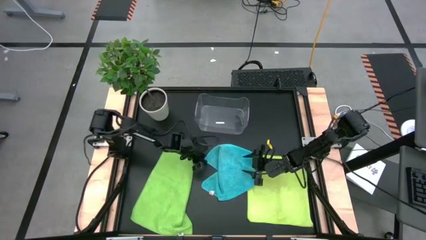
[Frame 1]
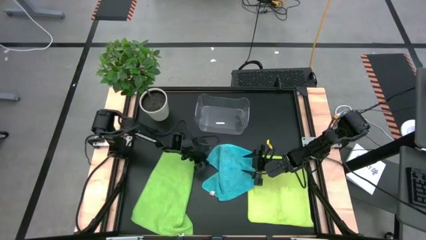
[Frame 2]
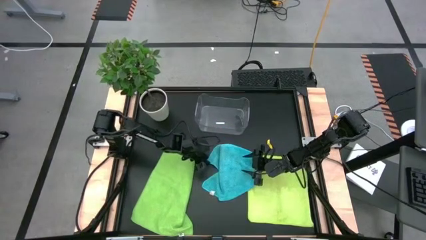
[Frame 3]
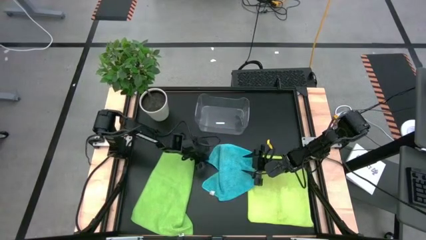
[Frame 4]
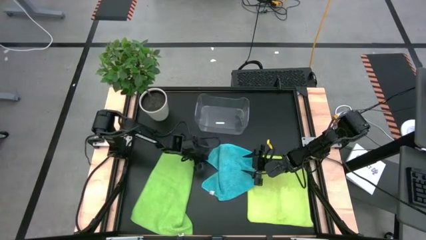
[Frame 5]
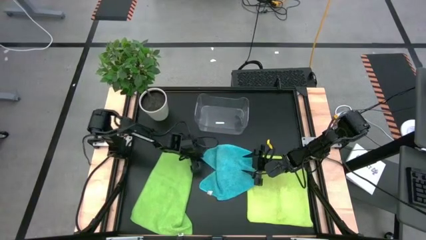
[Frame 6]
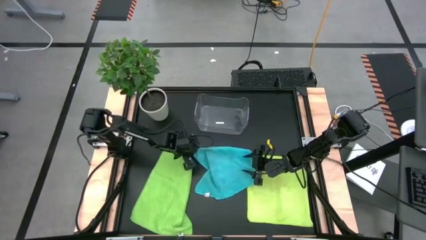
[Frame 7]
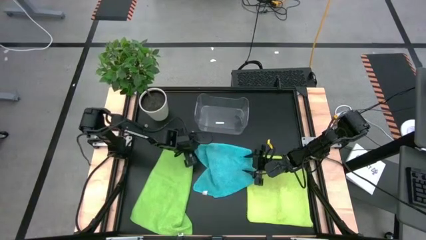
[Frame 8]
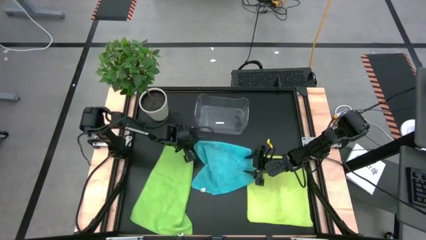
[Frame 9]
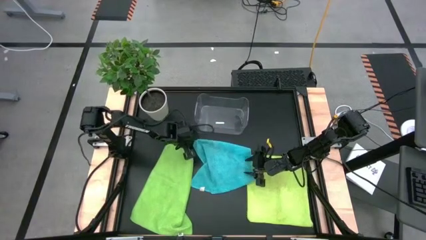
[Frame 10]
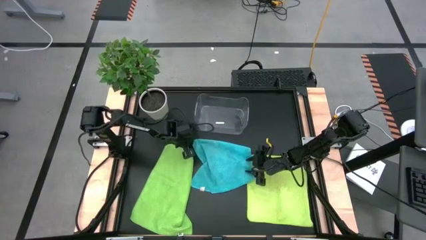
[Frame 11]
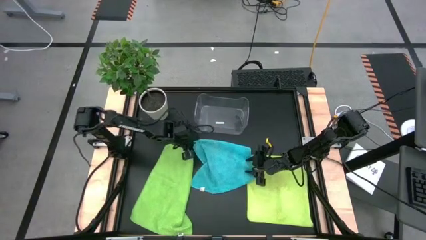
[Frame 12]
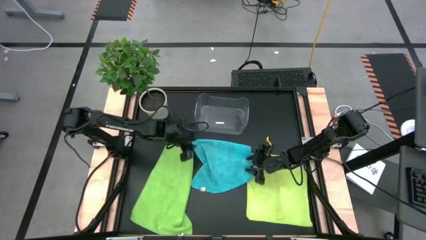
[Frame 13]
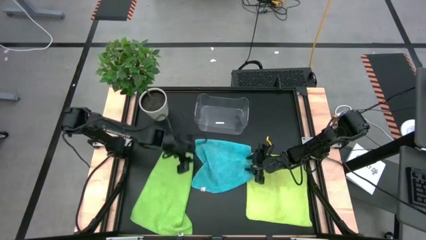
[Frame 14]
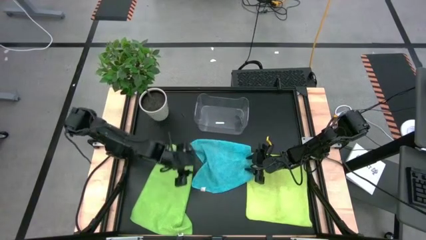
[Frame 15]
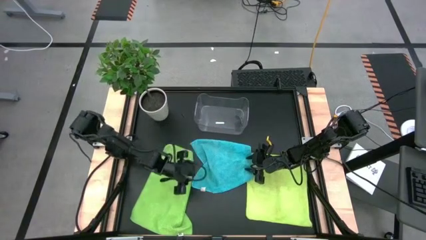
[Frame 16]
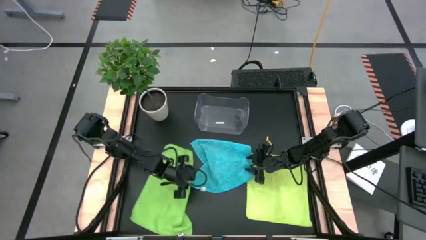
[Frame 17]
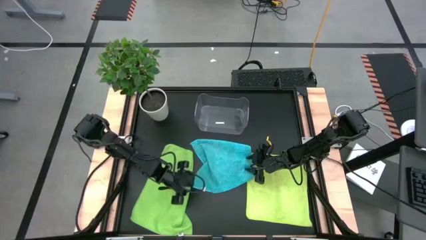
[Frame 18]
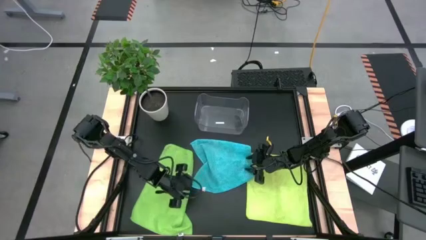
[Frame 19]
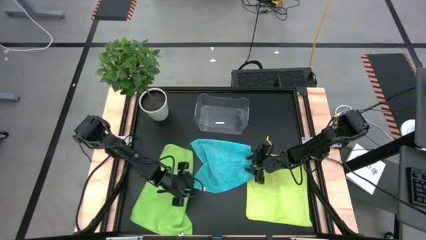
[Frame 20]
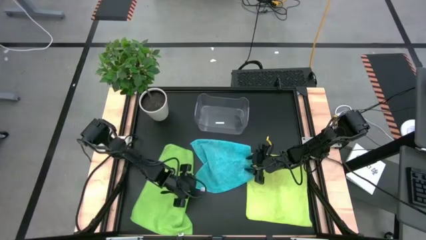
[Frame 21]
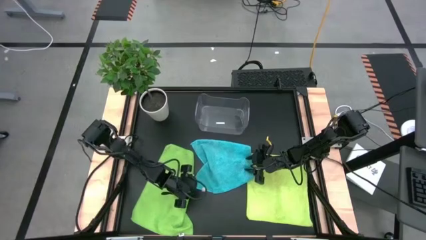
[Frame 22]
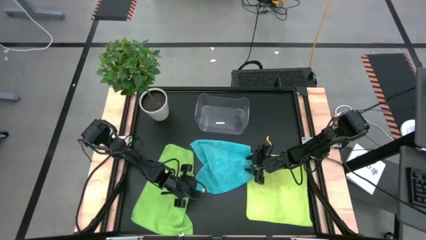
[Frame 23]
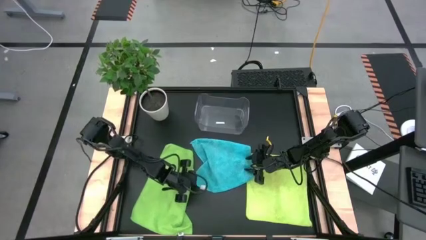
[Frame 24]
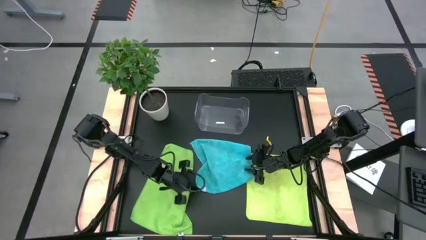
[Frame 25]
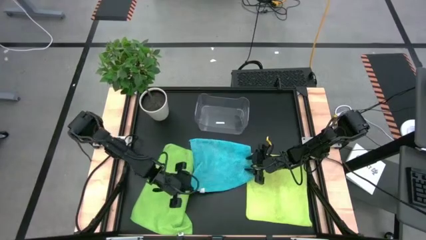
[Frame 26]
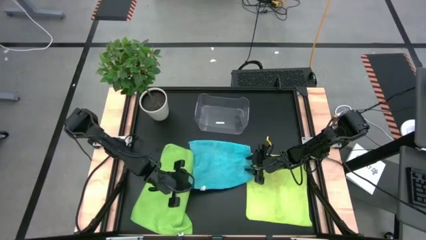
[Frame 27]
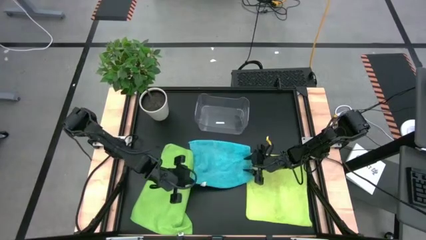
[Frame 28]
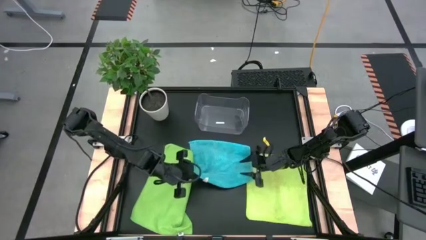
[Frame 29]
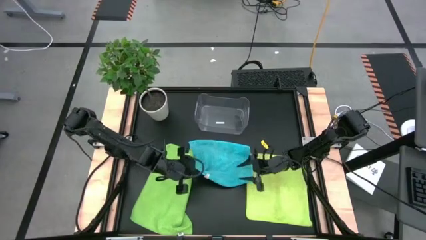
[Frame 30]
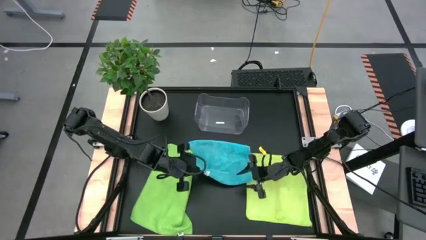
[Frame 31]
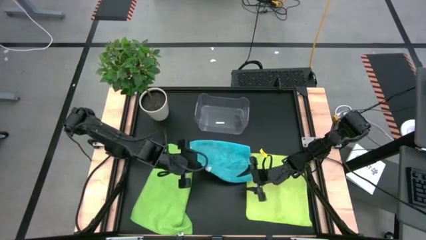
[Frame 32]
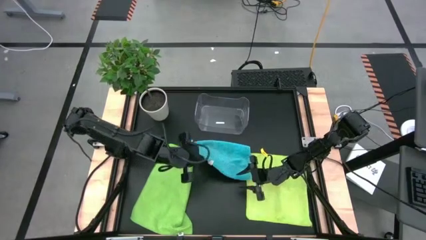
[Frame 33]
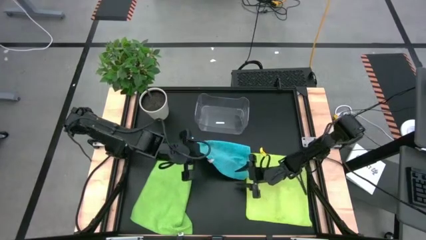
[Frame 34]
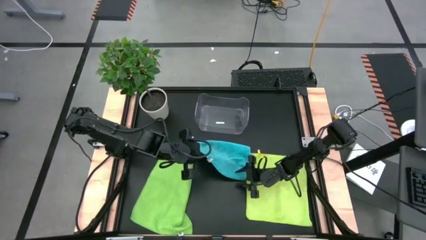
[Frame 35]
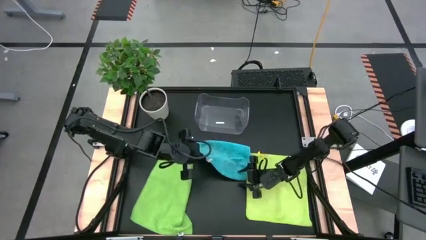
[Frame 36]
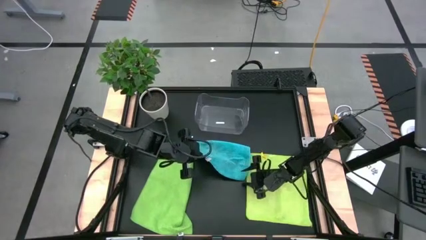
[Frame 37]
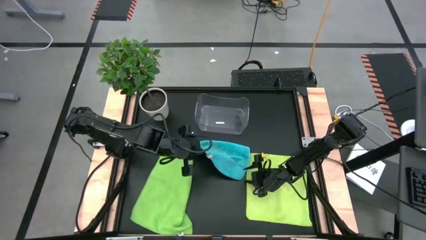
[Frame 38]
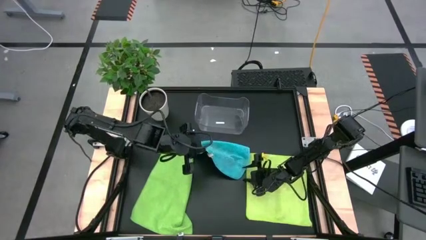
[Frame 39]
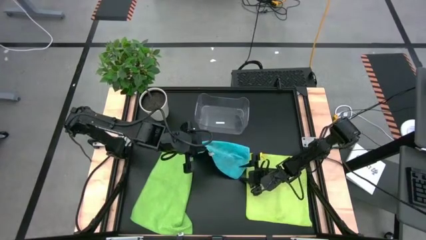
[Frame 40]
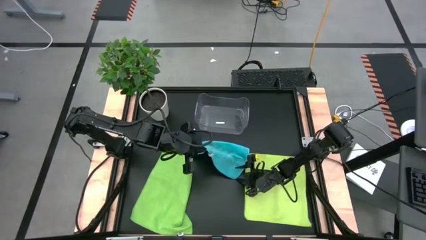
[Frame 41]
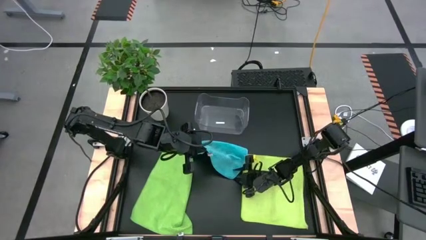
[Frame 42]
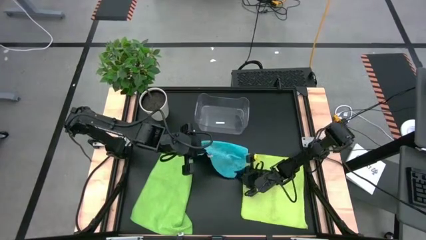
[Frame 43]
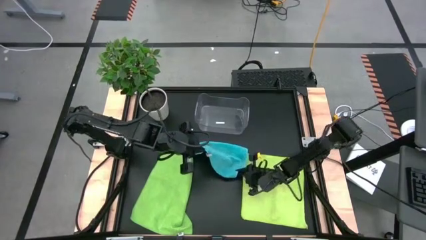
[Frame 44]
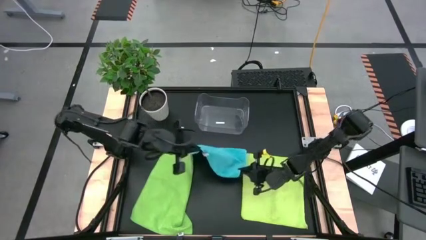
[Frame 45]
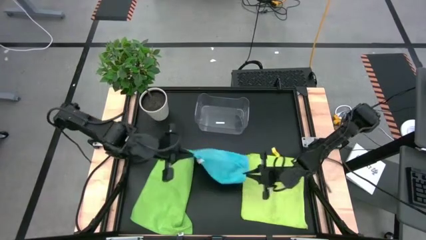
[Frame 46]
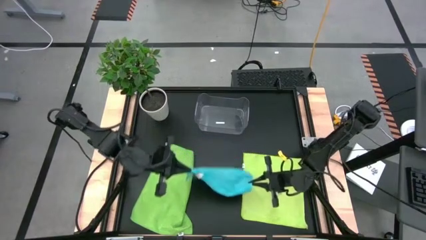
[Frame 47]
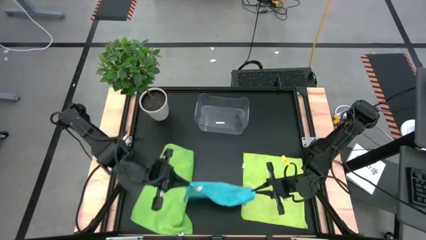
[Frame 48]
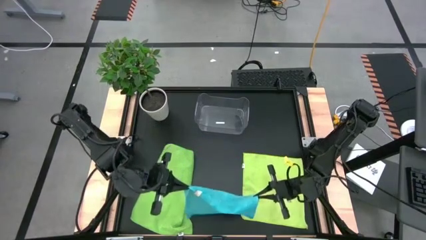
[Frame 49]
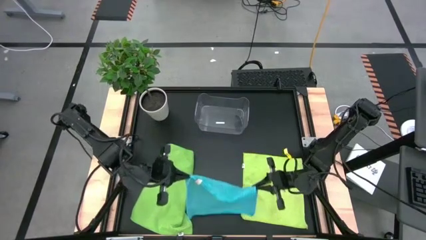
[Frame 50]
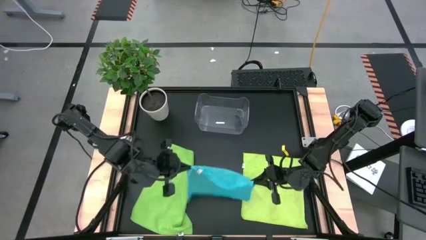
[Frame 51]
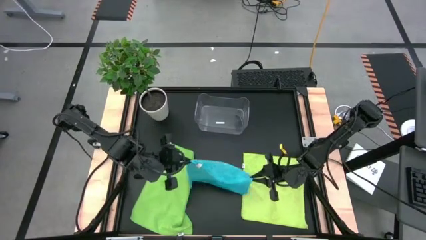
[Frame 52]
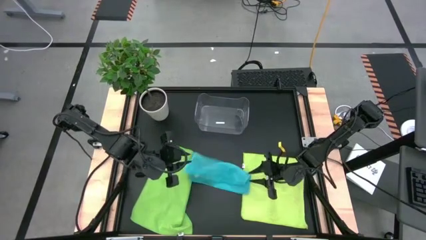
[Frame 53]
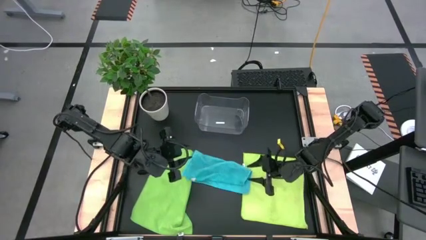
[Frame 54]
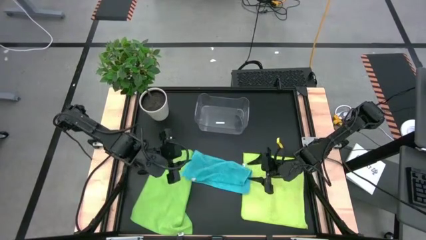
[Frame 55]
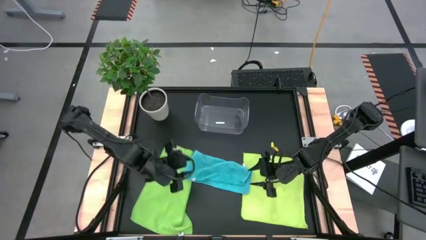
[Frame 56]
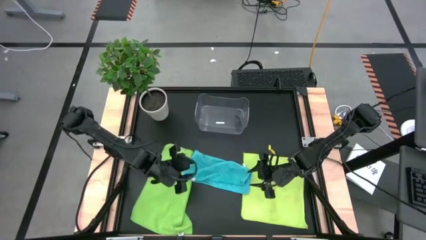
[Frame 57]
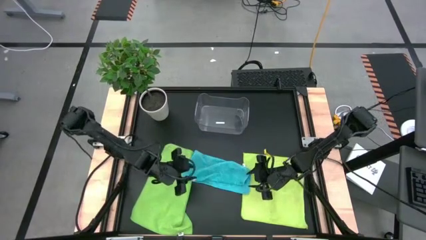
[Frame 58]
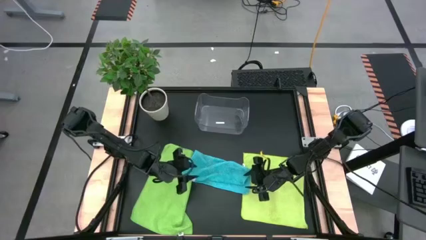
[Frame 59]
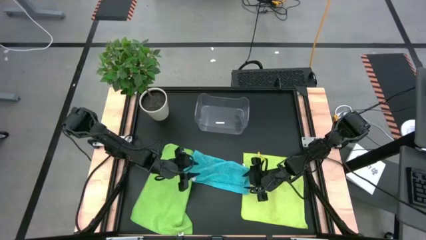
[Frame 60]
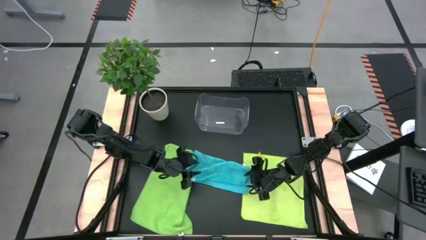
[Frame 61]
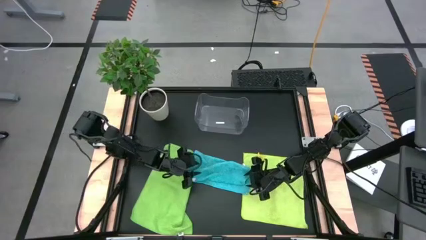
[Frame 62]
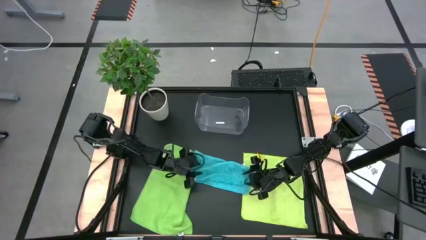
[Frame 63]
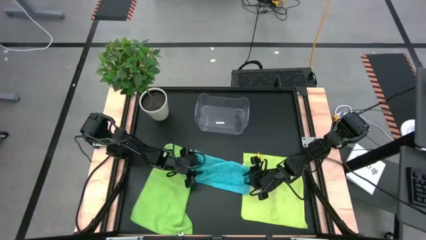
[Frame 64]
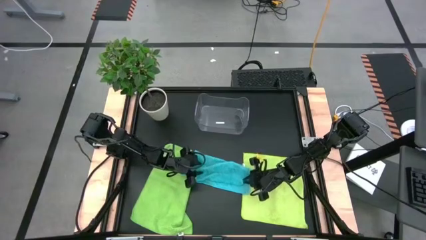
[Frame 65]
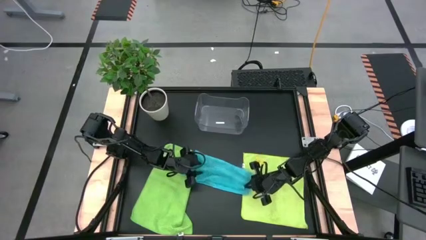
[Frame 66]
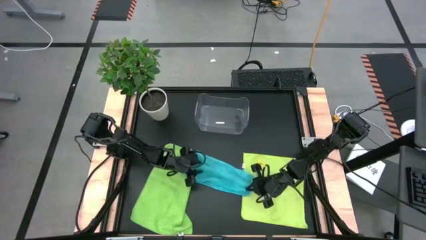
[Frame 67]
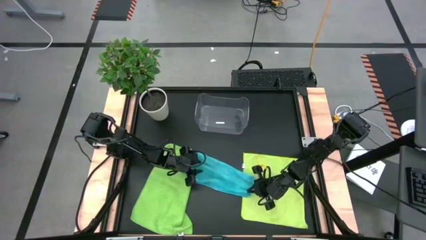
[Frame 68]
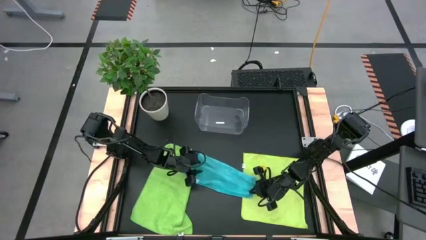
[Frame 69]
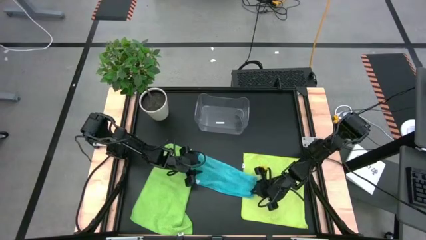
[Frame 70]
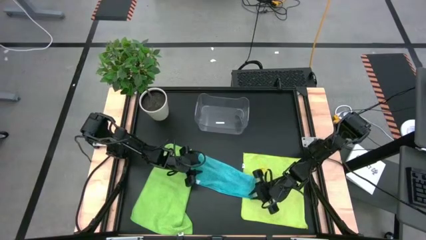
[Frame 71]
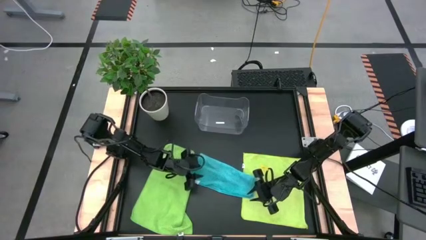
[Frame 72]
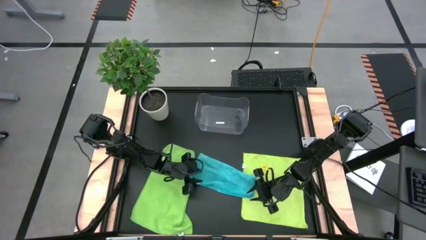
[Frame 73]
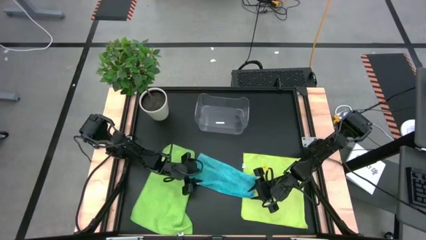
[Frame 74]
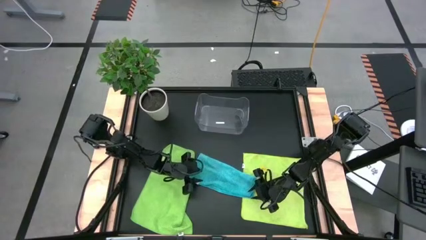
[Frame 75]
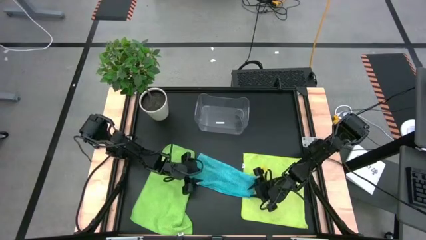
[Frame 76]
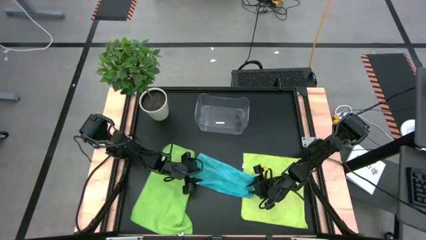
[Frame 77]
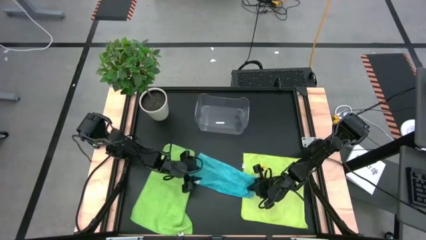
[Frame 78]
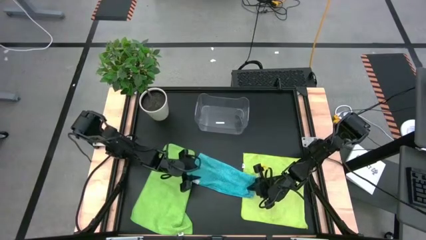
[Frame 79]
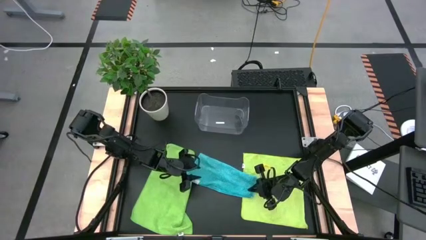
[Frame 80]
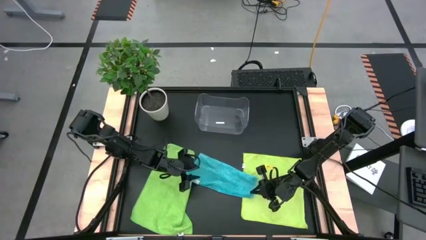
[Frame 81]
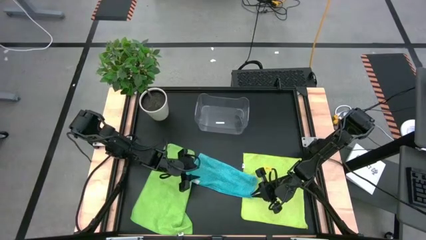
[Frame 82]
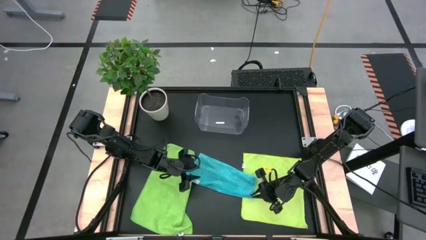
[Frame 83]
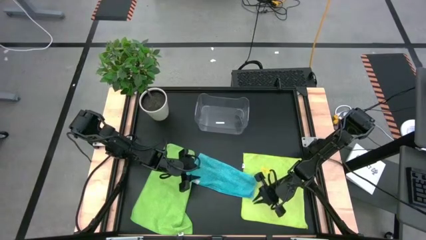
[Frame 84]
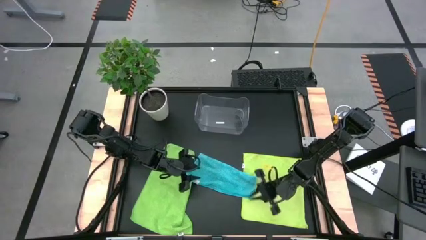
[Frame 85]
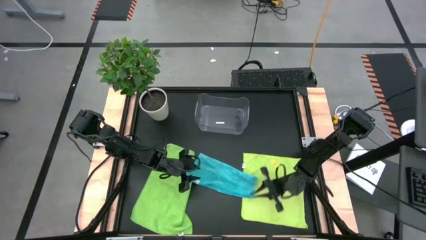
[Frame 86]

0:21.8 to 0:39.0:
Task: Fold microfiber towels
Fold the blue microfiber cloth
